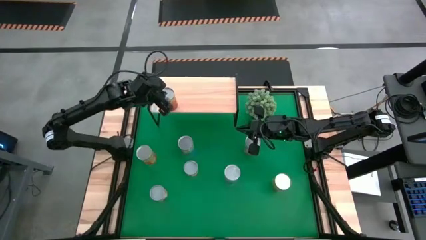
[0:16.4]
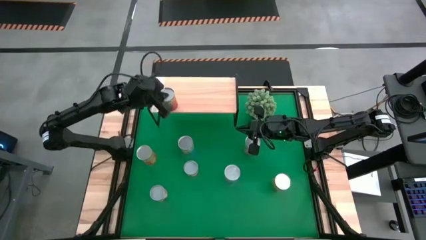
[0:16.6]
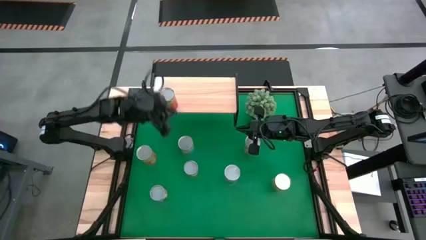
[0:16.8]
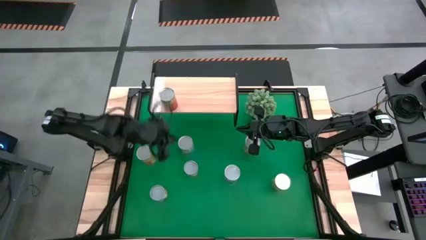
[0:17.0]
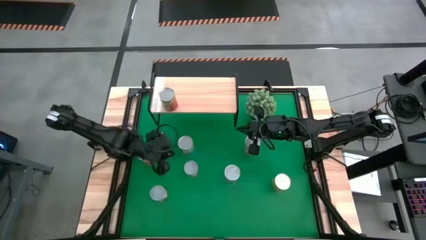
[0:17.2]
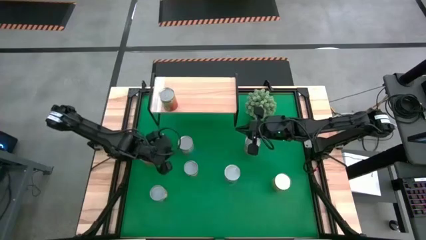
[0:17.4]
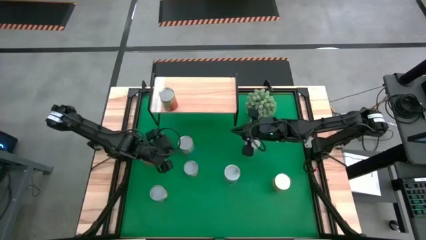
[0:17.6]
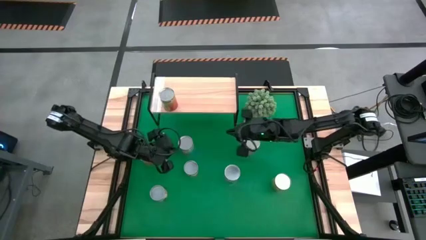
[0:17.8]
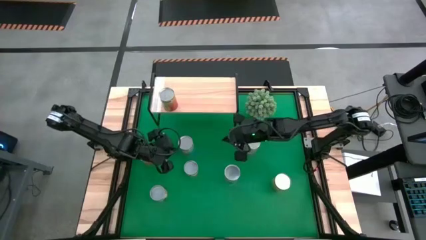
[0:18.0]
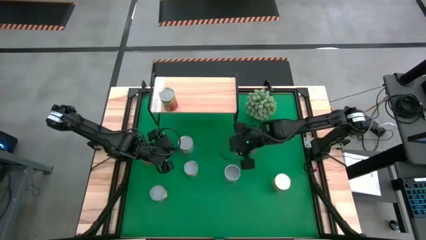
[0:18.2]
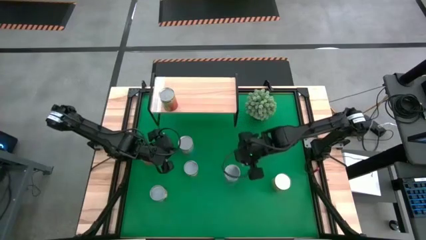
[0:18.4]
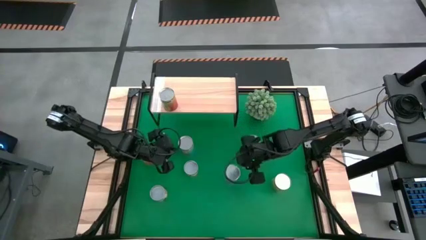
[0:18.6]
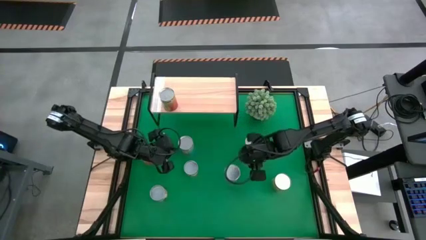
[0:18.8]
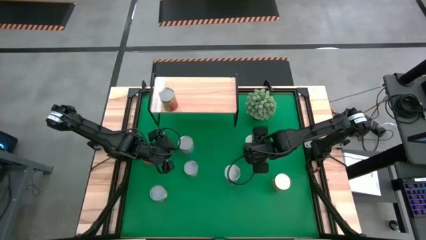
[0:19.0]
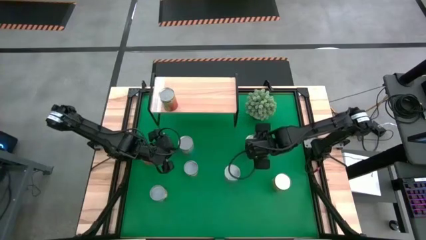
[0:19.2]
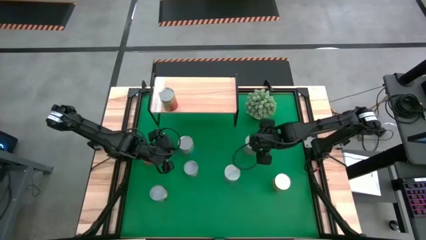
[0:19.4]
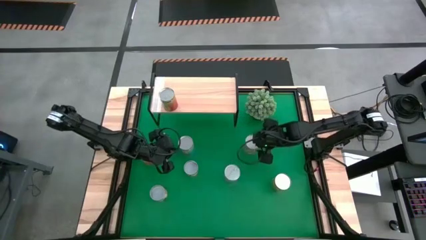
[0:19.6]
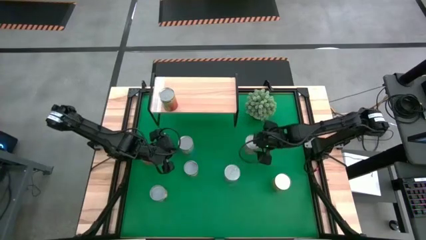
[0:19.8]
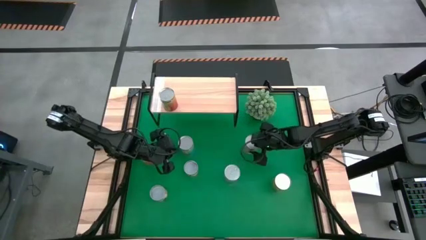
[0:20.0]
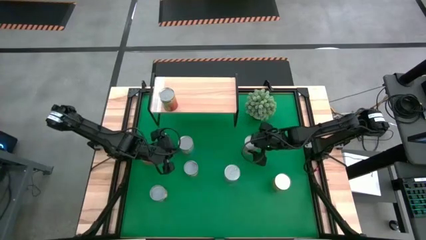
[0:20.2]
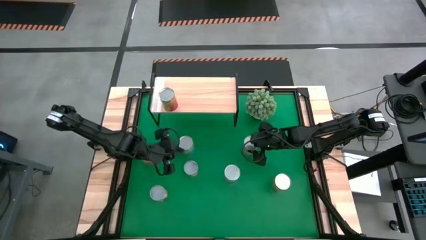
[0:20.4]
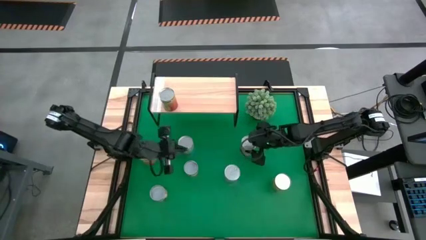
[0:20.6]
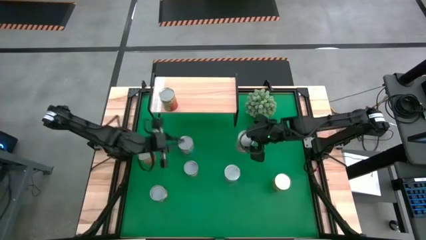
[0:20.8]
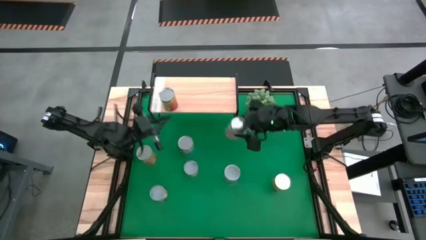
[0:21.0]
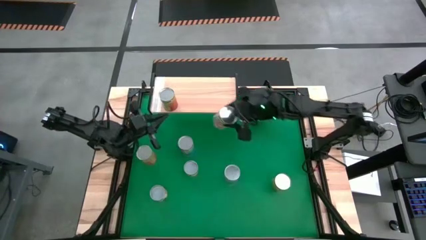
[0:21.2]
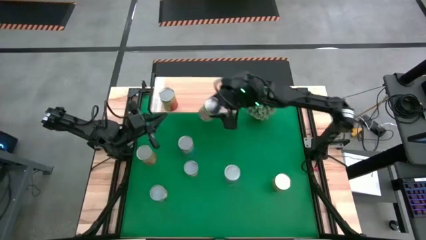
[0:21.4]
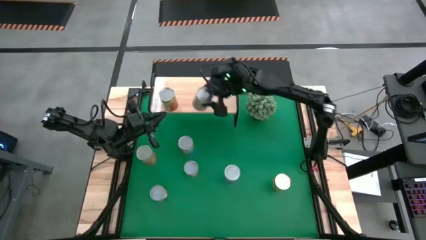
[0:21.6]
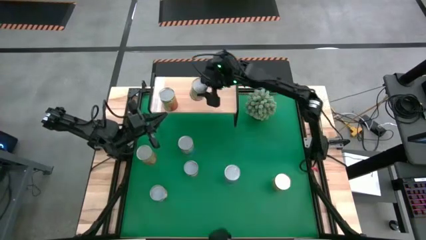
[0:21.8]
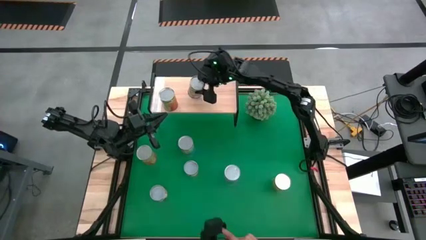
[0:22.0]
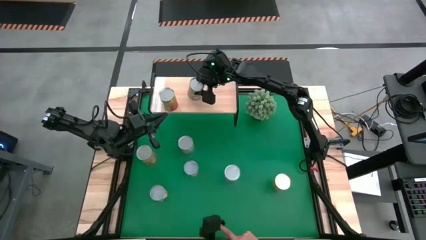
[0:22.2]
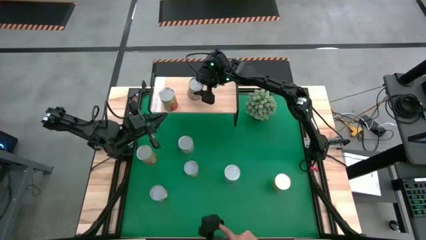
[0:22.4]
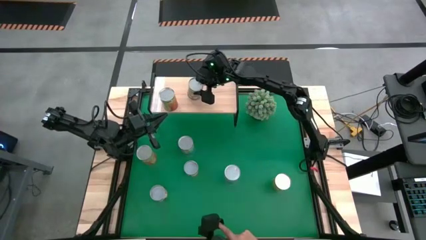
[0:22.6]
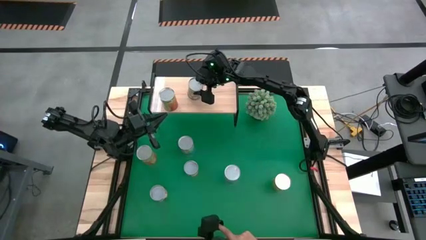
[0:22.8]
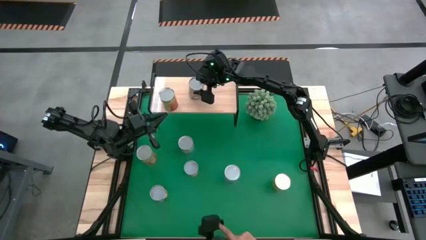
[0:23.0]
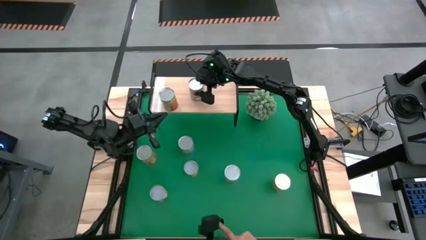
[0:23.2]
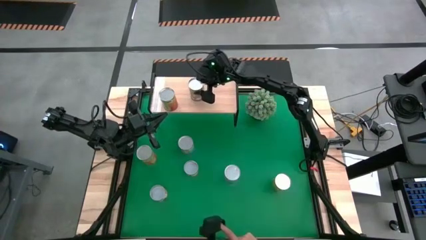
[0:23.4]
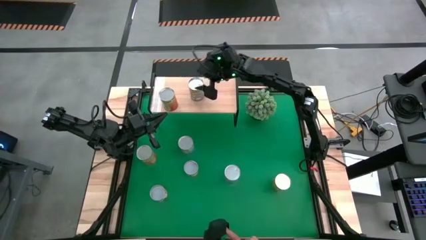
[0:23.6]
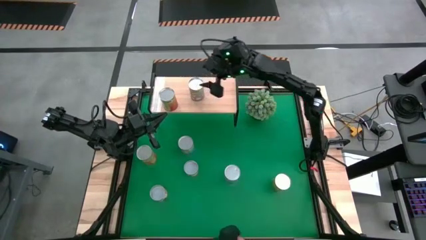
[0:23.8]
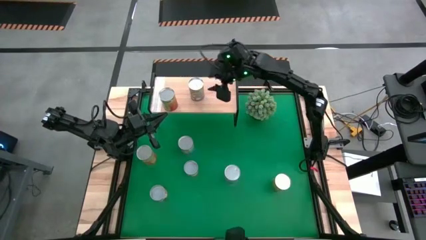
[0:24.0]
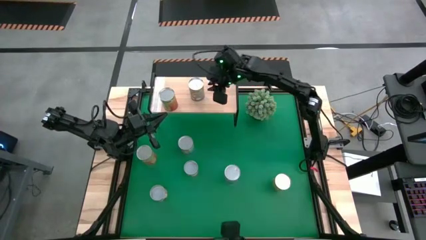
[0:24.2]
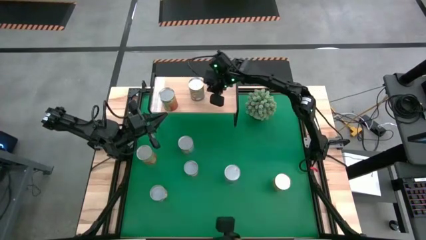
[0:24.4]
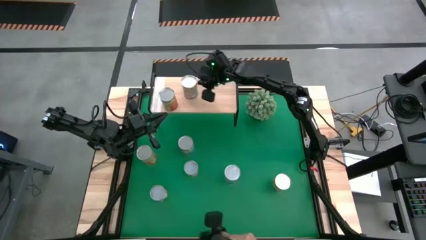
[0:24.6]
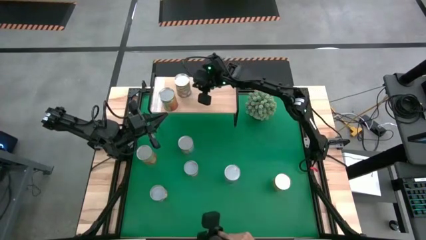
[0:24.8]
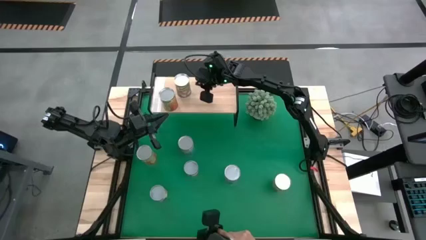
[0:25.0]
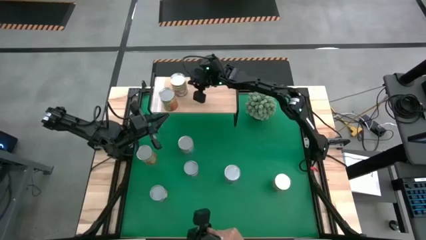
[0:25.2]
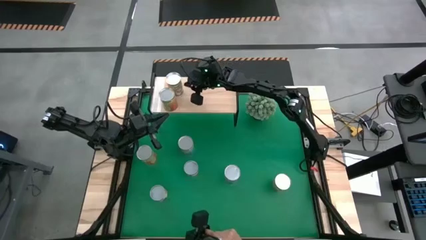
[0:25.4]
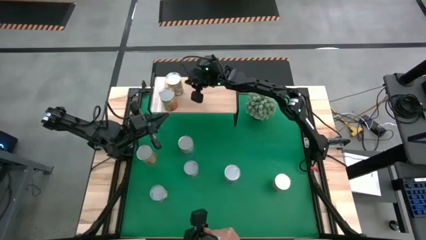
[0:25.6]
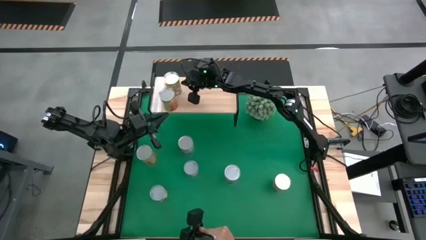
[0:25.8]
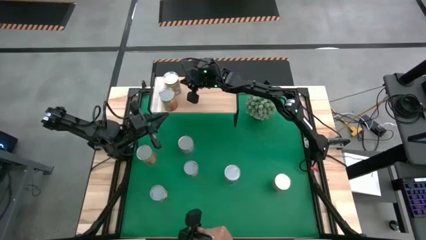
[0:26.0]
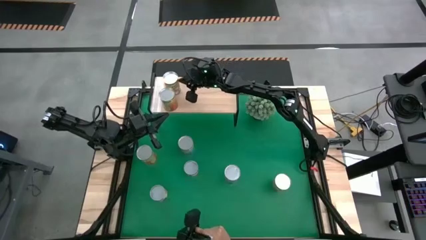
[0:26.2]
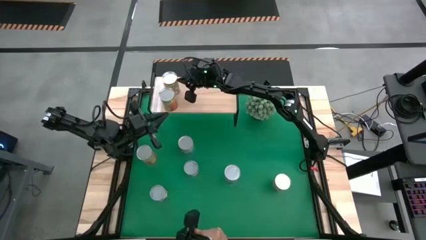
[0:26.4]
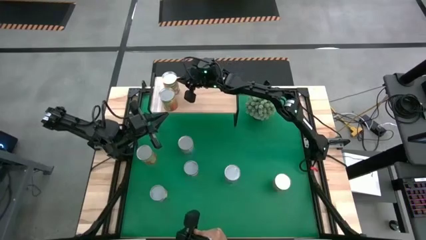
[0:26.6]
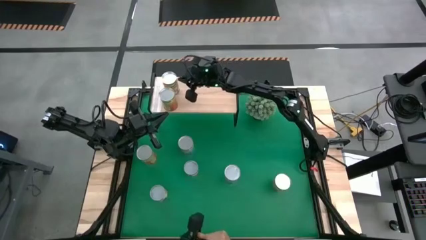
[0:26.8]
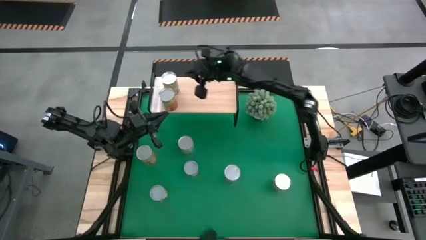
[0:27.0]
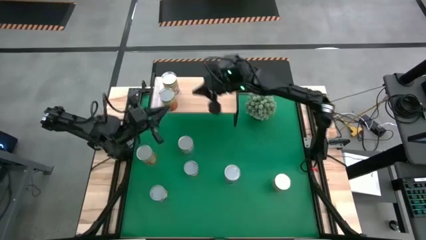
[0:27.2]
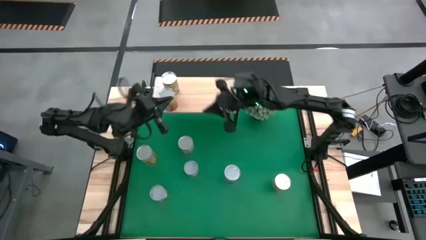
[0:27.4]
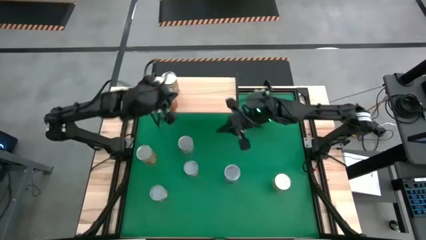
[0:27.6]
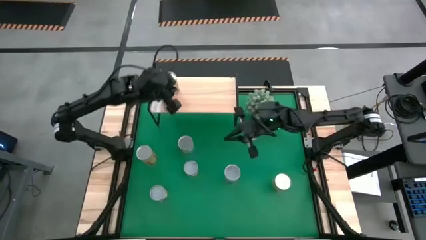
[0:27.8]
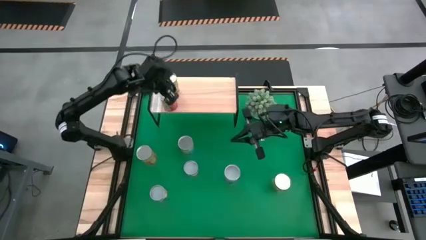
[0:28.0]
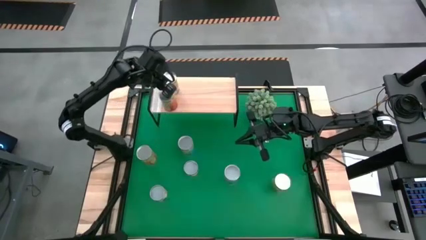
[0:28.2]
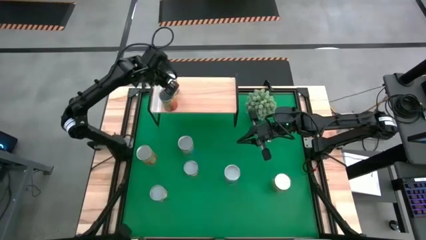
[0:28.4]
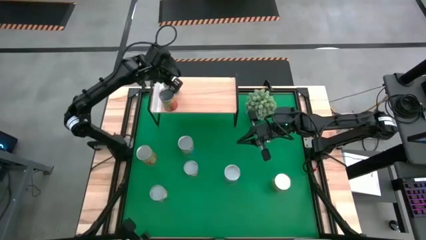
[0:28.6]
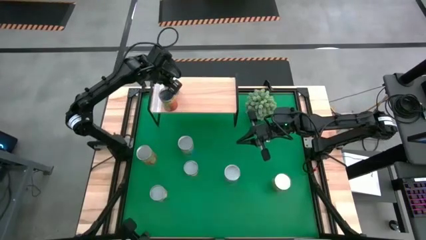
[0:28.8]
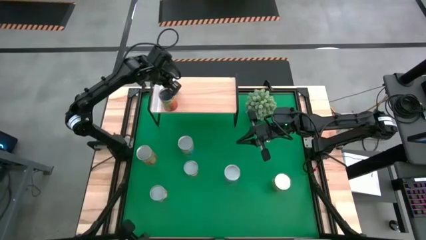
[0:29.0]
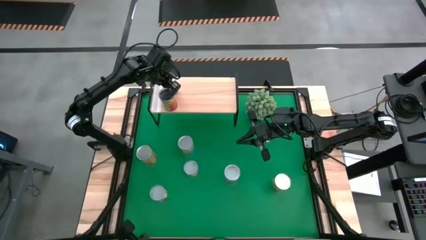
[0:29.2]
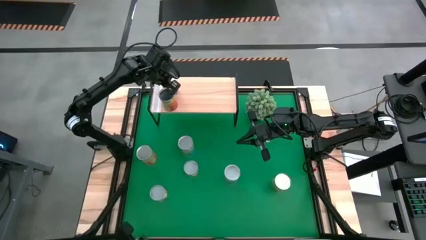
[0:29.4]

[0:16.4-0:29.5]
Task: Pick and place cans onto a shelf
Put the canned peaches on the shelf
